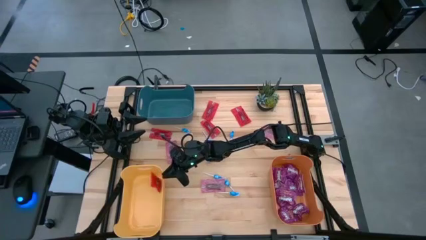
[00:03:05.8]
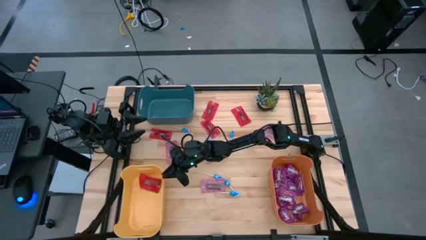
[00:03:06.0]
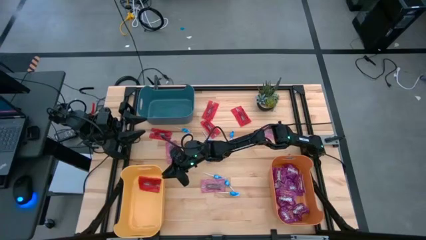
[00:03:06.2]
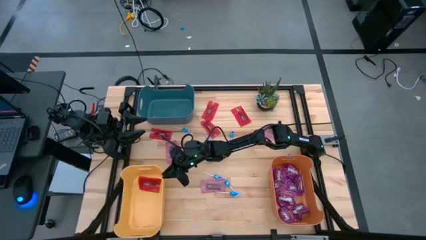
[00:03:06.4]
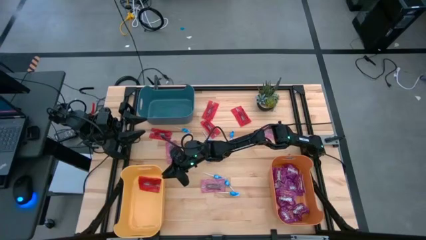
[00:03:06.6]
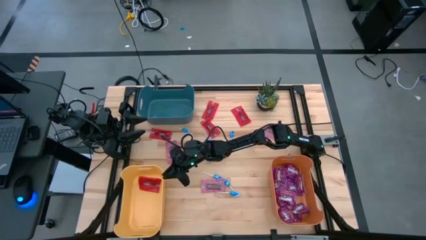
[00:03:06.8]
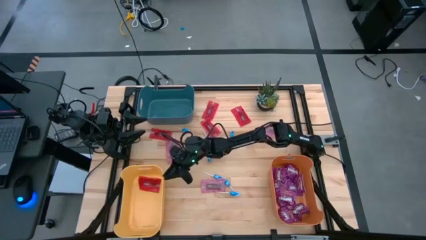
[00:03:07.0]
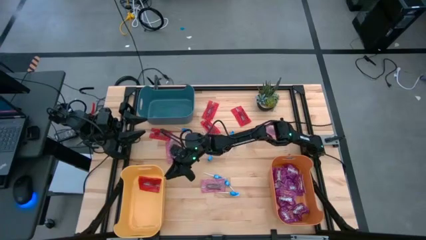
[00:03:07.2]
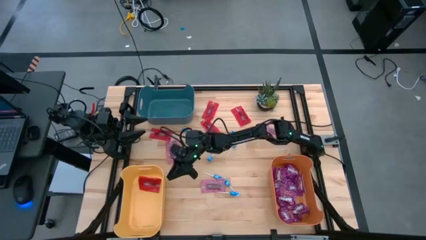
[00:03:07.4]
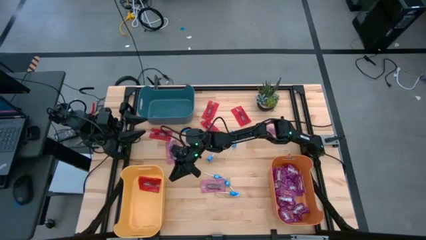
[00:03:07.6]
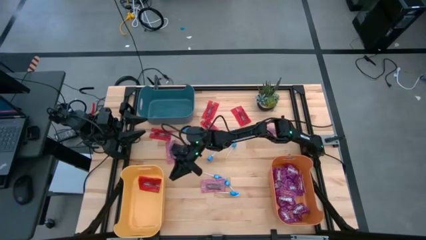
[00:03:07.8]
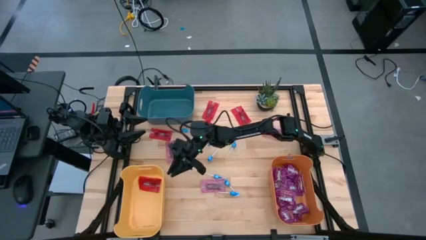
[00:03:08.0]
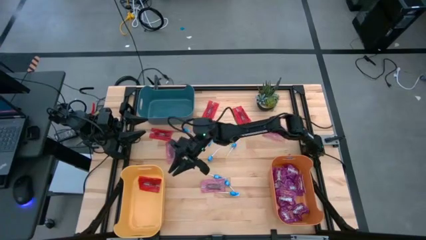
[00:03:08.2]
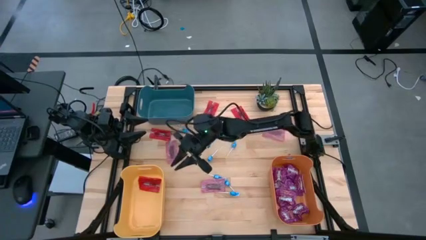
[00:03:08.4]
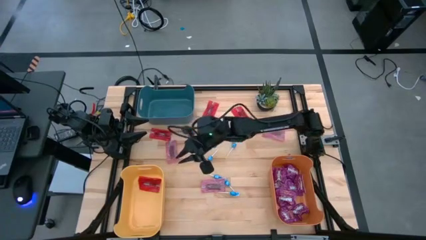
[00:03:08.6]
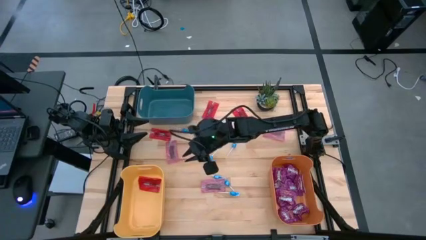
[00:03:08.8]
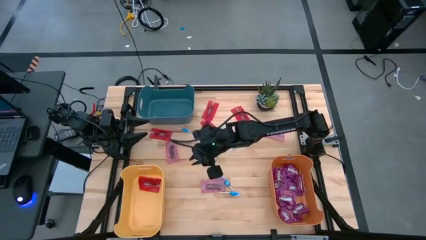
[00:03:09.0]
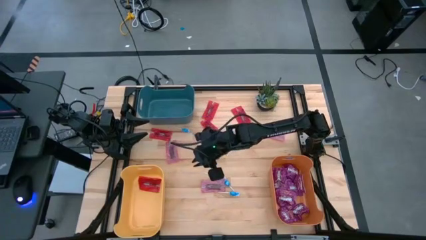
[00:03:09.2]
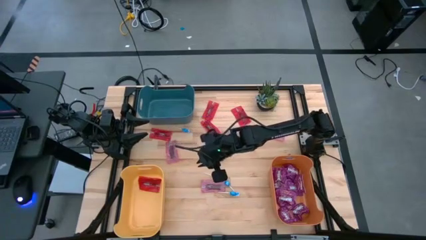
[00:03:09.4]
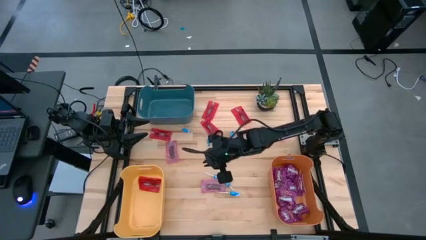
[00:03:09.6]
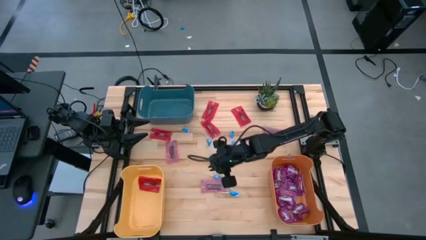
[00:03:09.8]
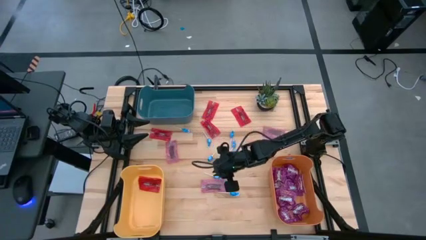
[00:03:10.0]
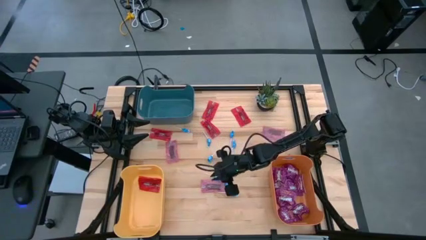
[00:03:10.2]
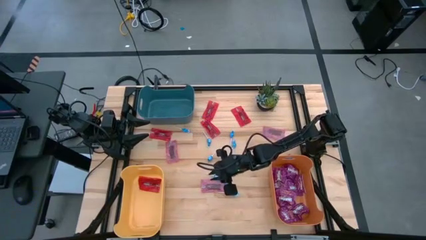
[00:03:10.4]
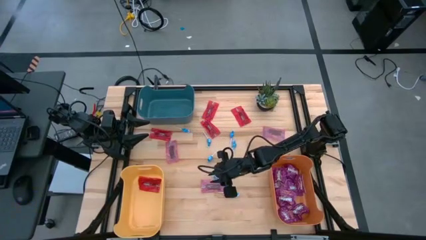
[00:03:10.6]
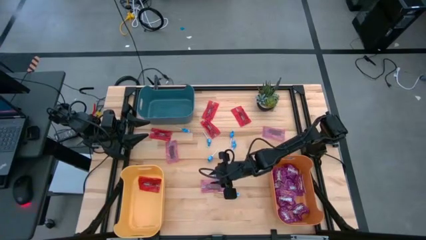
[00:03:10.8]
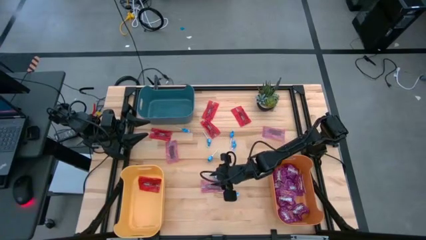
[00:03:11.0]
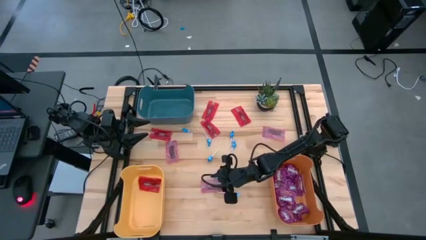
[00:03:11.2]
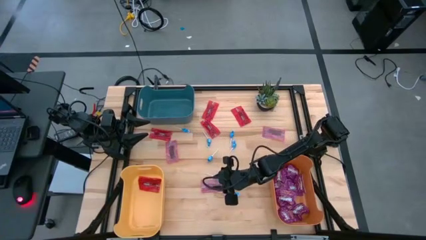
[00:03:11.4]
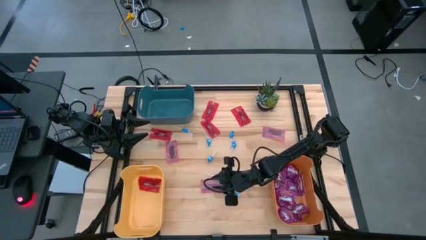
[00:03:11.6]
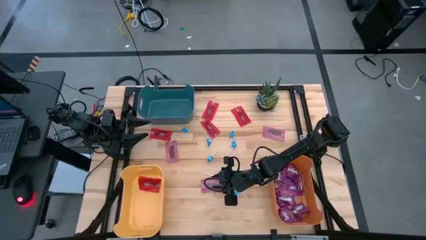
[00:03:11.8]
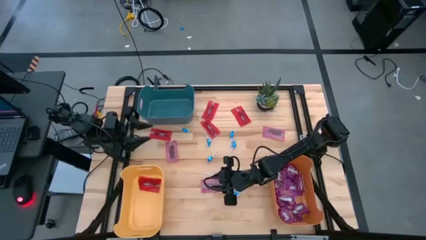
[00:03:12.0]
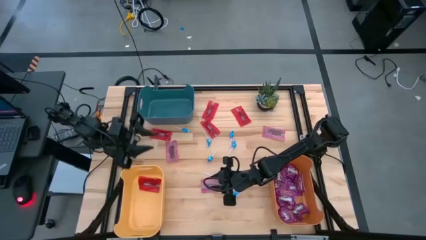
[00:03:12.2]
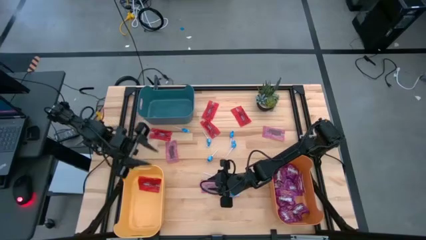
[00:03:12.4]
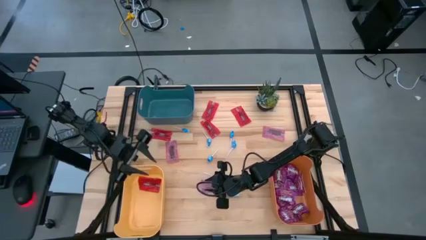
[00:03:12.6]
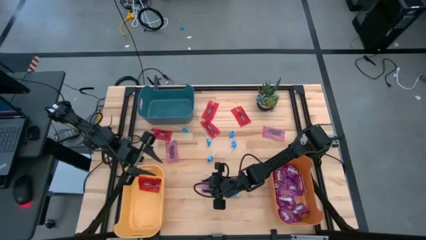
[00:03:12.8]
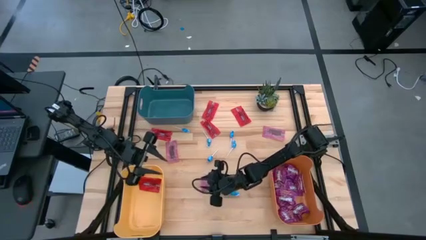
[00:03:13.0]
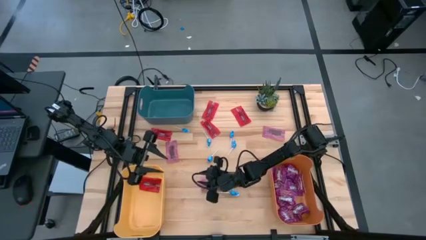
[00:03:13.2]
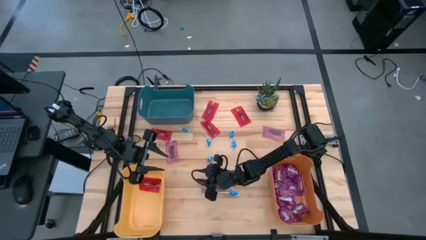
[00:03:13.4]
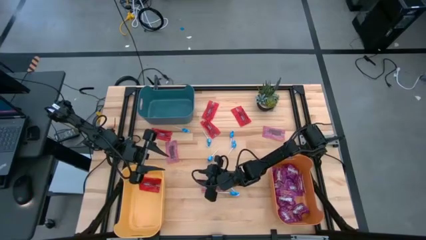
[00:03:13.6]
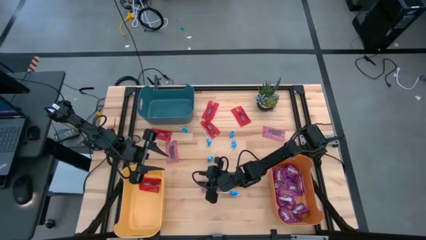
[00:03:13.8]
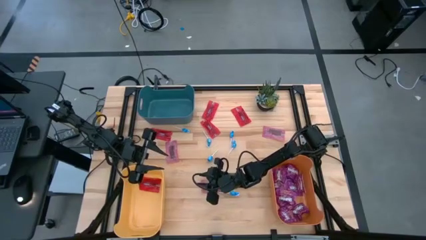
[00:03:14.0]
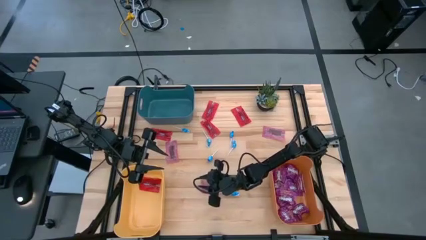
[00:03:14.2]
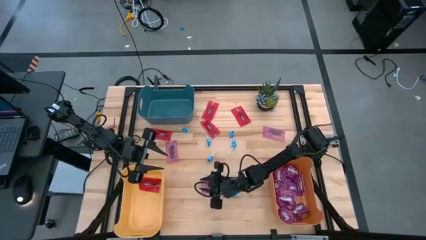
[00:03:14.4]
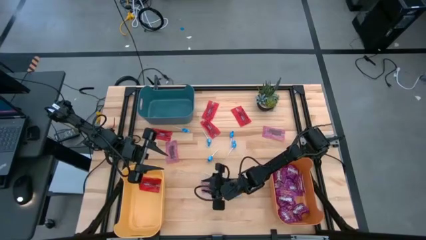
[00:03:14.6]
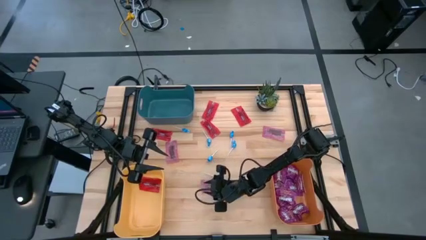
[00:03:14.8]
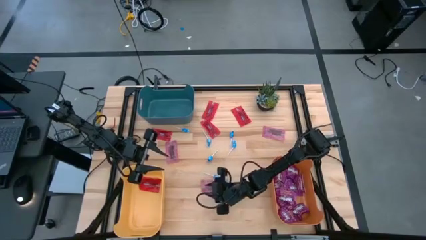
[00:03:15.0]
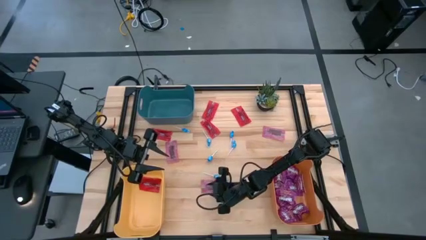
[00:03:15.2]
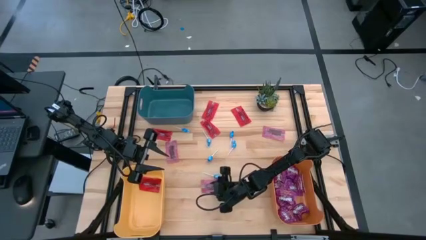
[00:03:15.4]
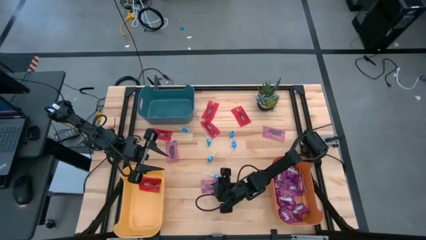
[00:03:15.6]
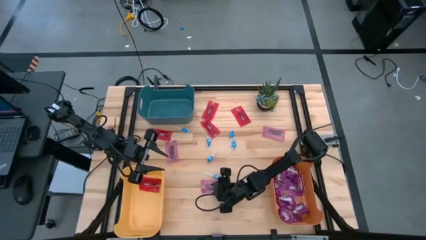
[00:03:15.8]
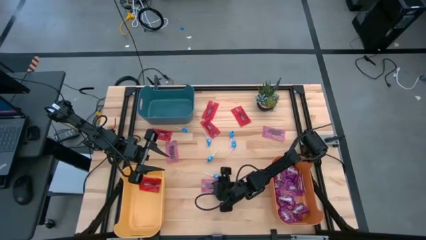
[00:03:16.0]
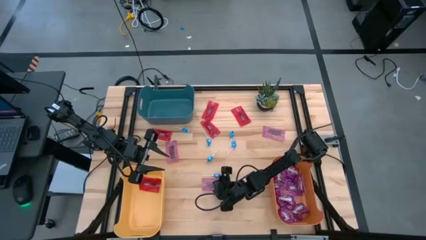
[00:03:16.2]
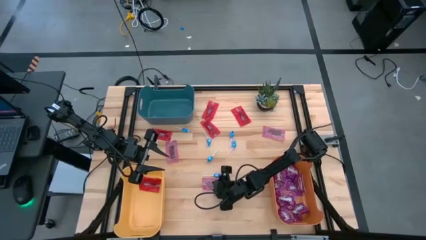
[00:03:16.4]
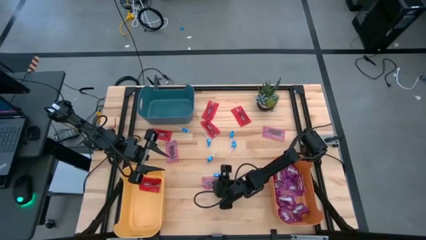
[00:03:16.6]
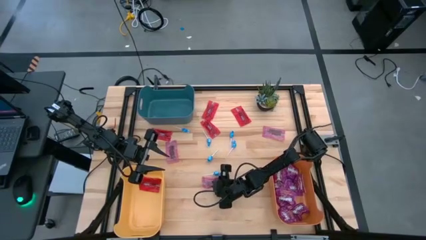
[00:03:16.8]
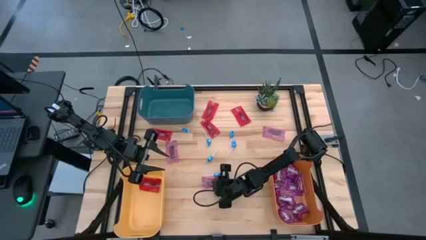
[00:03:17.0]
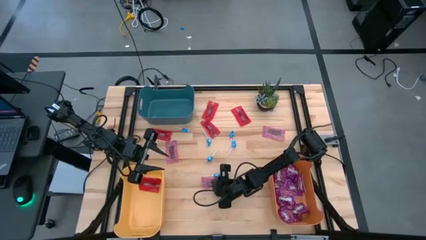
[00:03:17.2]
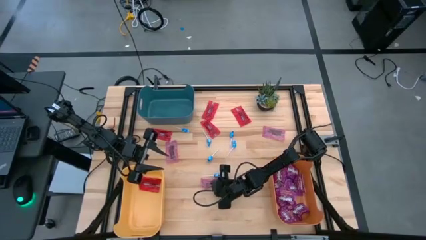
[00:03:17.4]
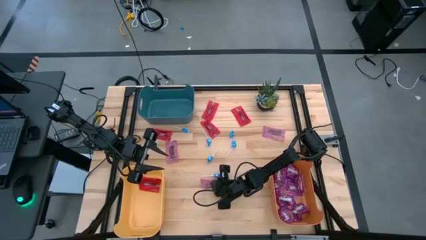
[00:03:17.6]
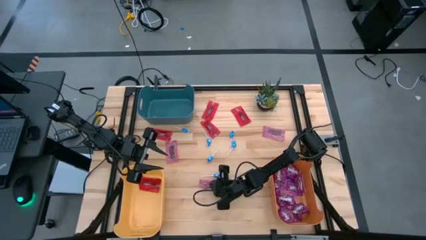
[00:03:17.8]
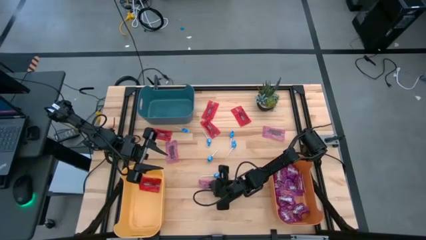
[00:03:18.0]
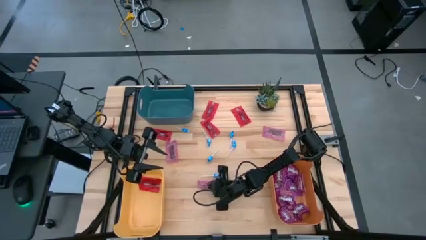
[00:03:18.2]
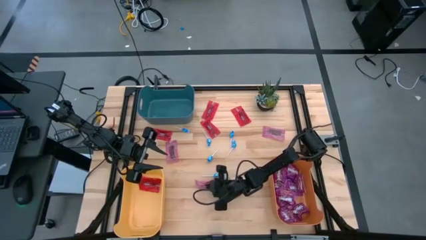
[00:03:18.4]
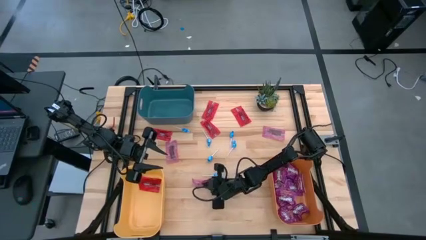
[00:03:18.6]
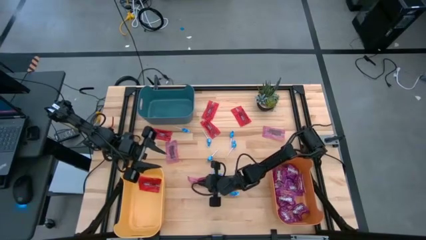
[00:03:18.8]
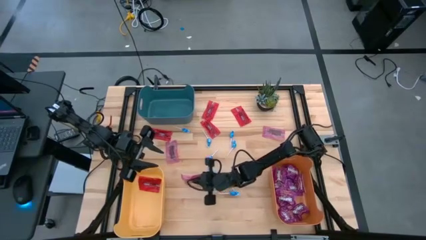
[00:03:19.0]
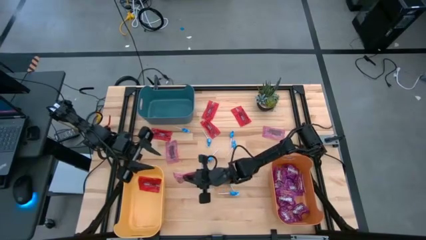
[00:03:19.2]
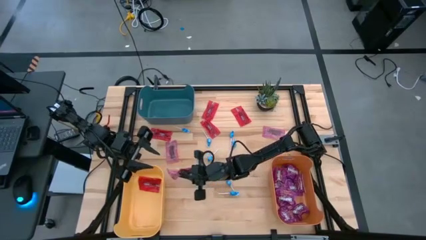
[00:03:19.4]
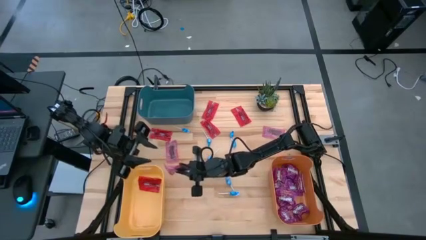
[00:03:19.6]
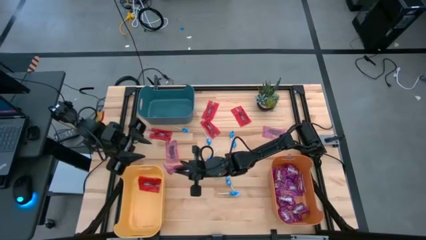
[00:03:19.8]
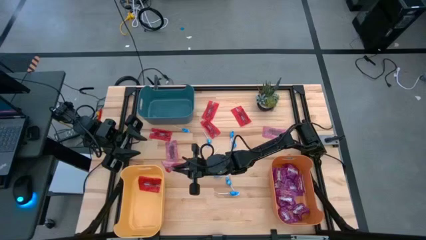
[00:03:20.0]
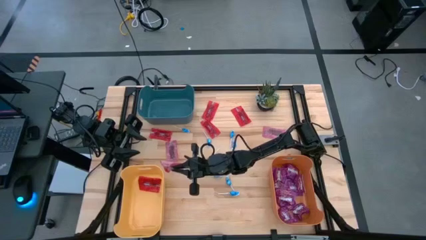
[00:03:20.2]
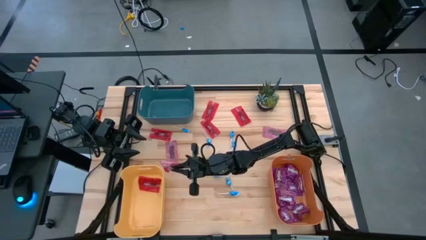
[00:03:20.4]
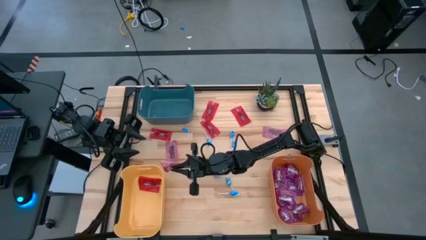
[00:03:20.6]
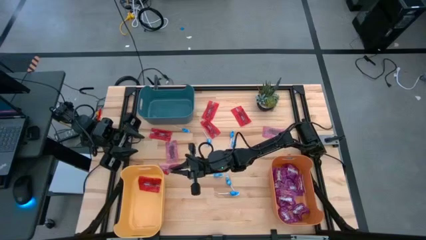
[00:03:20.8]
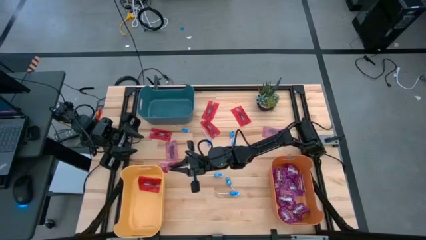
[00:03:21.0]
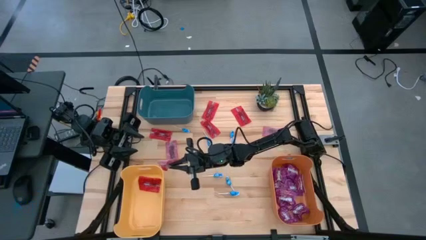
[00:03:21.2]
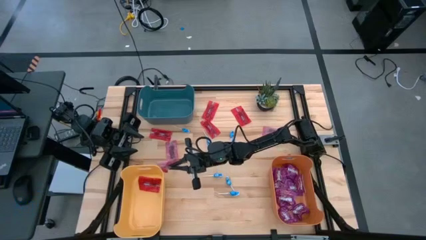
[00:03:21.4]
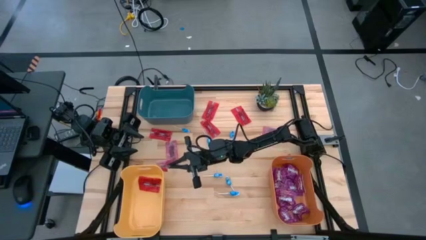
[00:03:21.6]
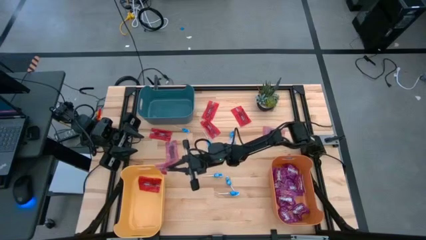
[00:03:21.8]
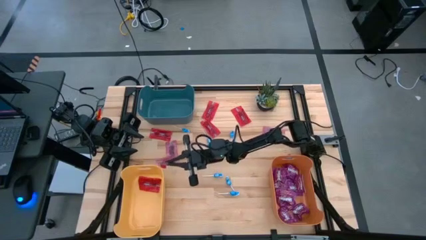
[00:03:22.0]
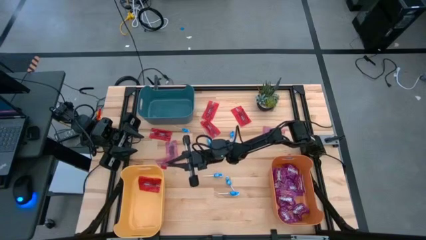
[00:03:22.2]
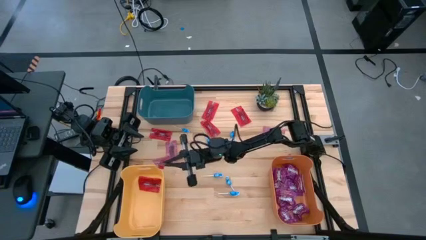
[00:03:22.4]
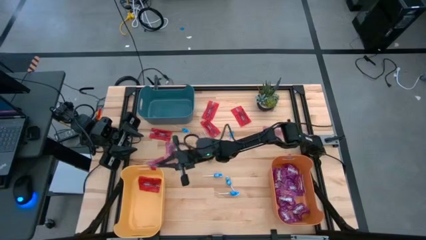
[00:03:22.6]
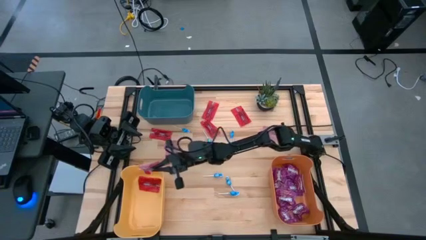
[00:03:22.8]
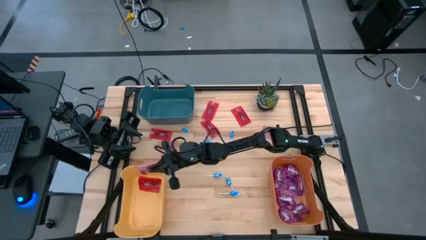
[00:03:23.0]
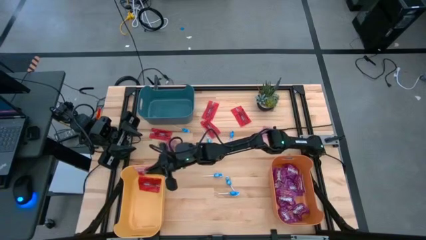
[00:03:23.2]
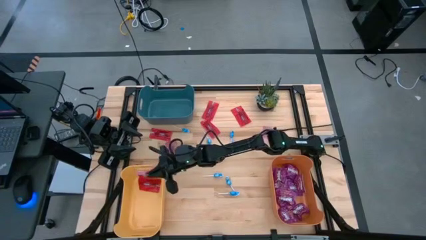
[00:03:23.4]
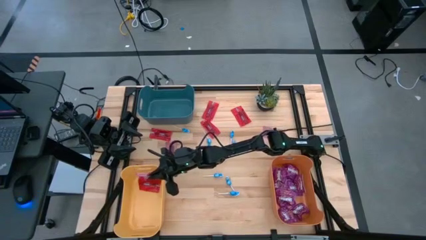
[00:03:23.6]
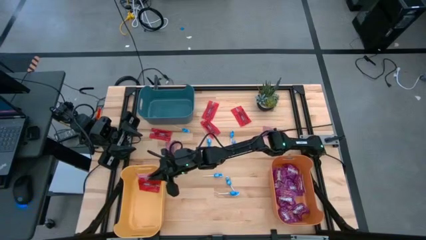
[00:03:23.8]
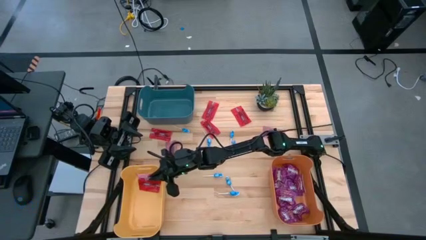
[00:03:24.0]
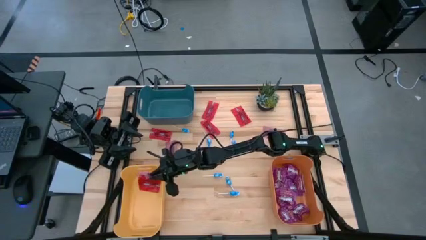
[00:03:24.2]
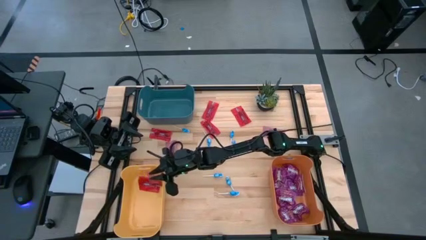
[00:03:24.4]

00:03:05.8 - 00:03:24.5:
Task: Sort candy
Put the red candy into the yellow bin
